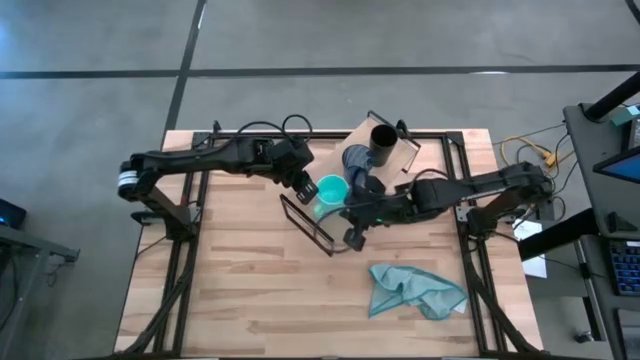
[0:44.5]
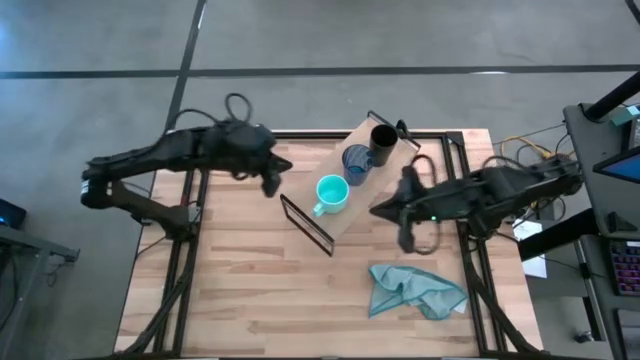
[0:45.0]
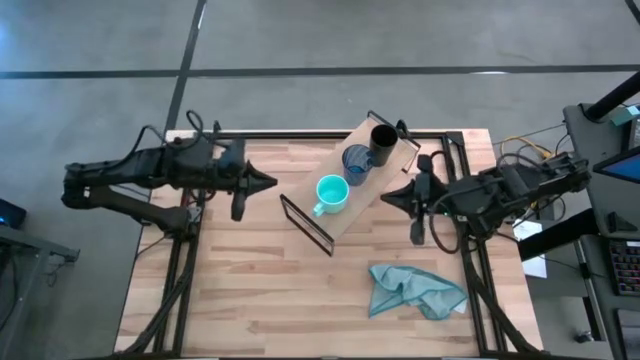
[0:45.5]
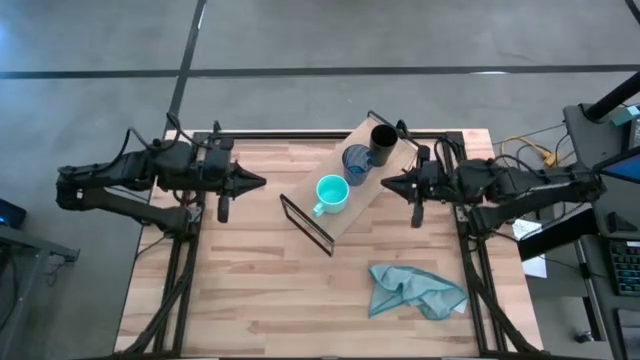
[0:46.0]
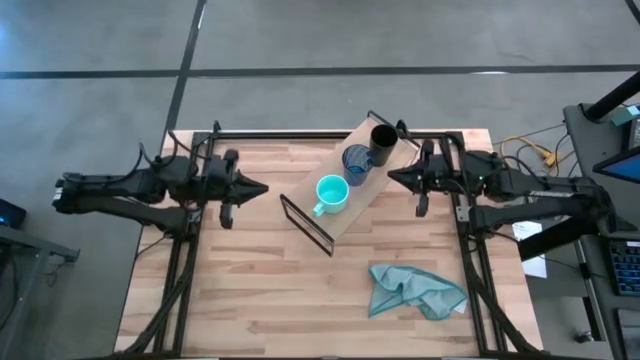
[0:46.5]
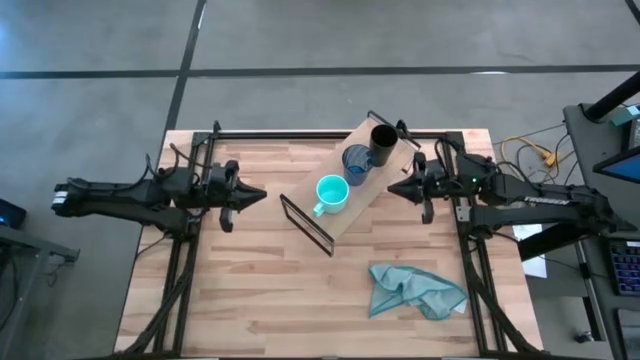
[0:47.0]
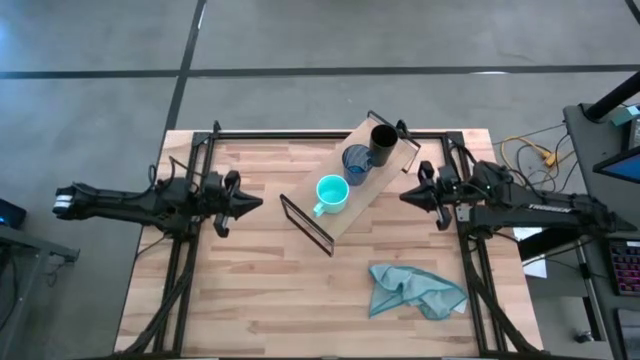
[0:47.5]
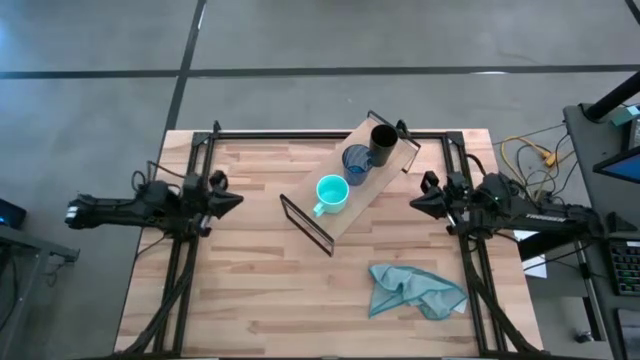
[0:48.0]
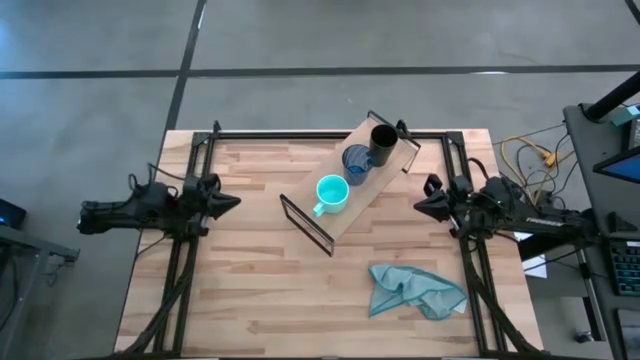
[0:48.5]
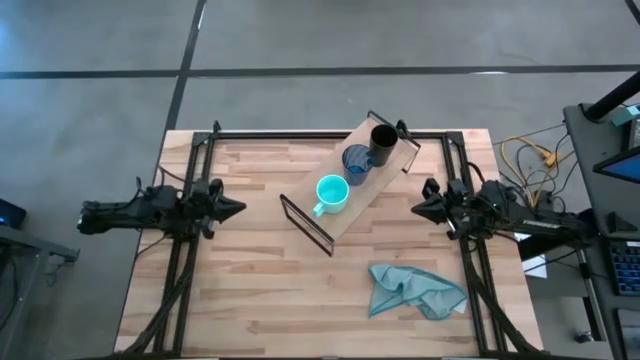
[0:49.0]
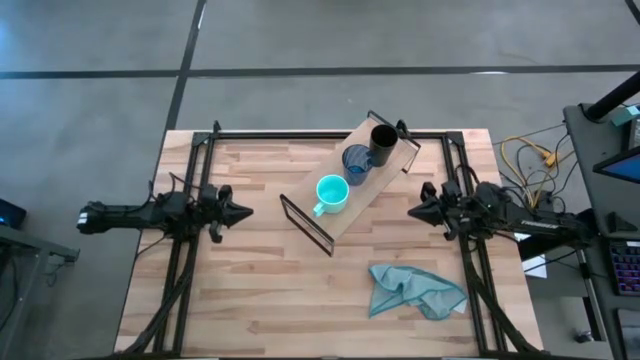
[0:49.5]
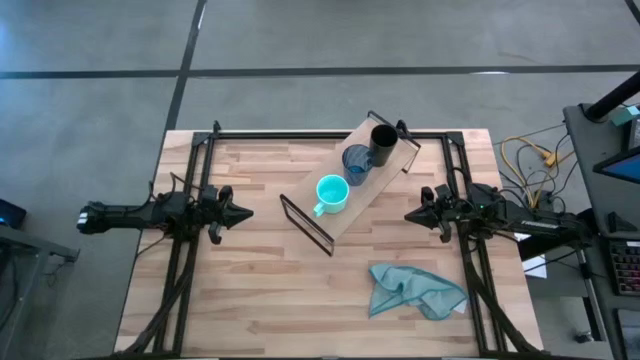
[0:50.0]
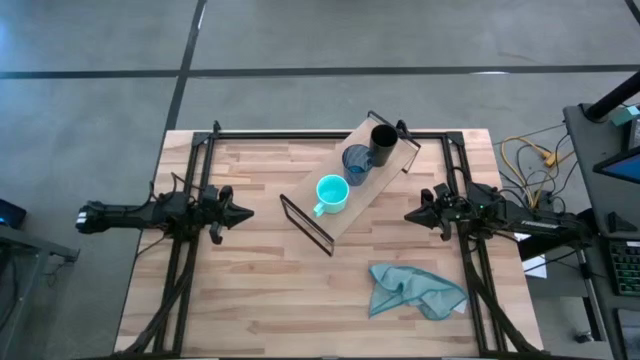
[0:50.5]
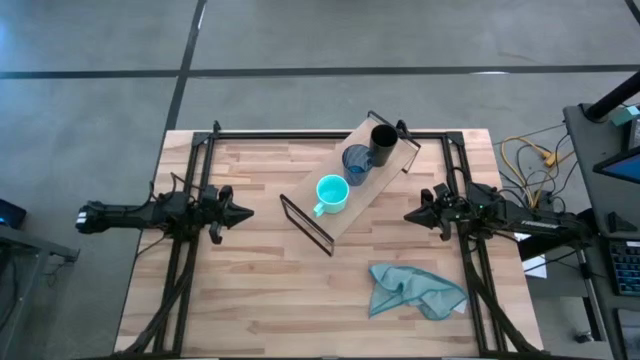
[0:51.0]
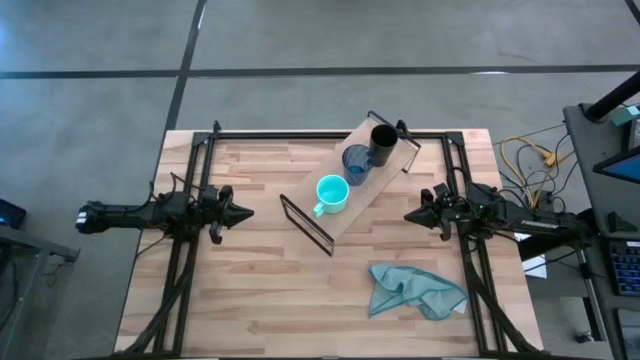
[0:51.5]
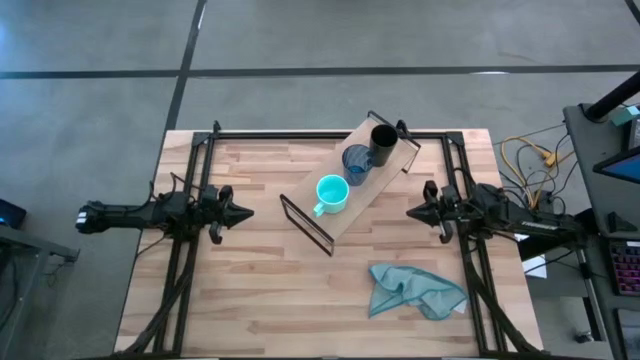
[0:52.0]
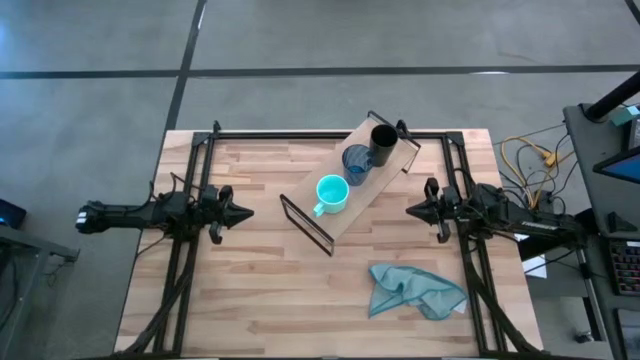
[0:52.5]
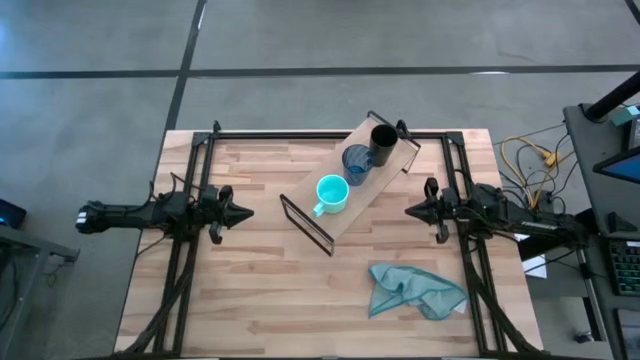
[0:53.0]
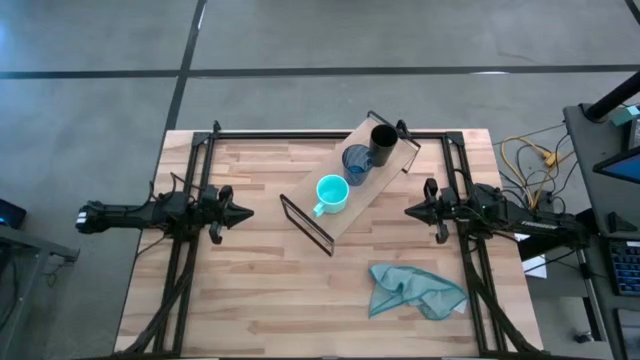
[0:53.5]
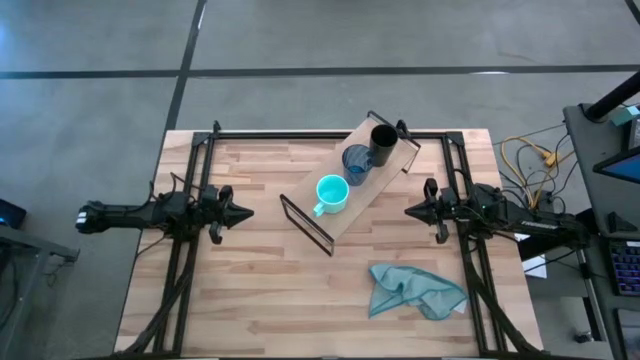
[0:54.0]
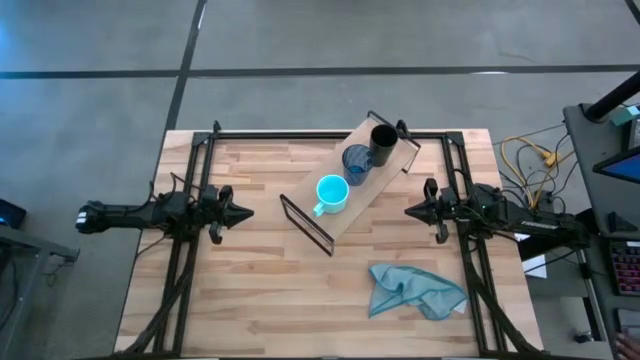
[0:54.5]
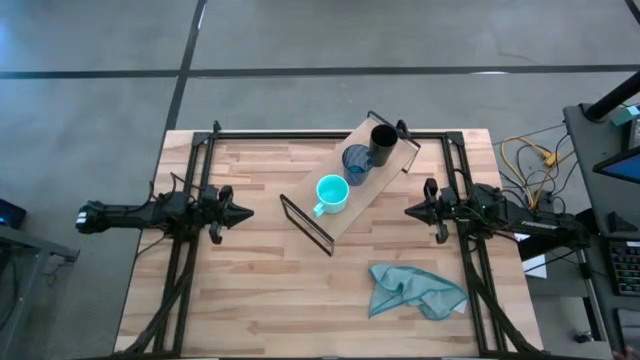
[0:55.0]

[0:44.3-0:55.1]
Task: Stack small to large cups/mugs on shelf
Return to Home Position

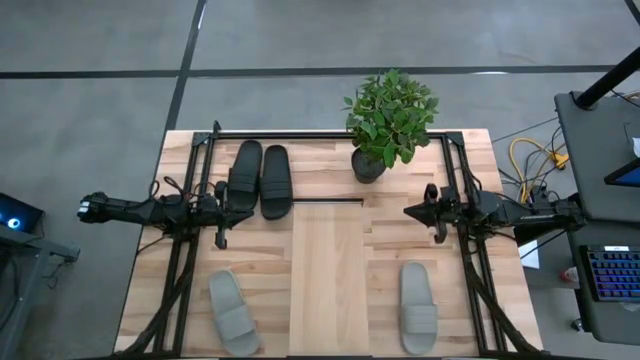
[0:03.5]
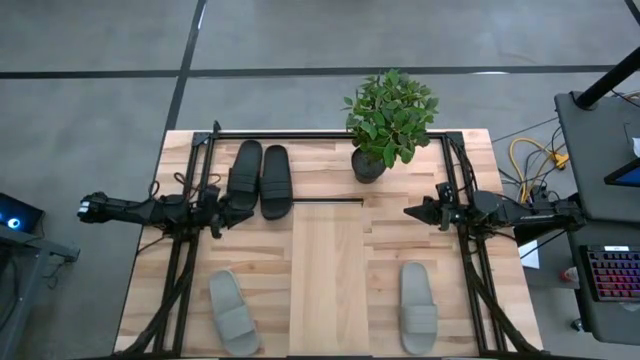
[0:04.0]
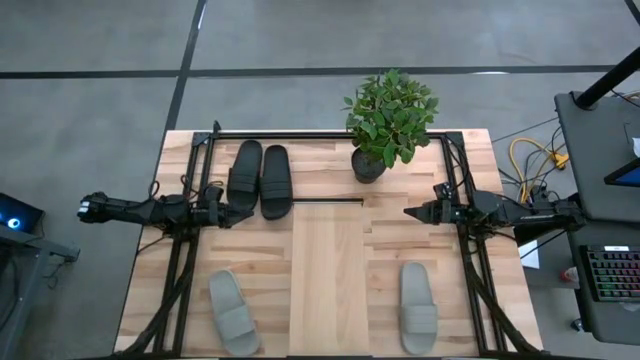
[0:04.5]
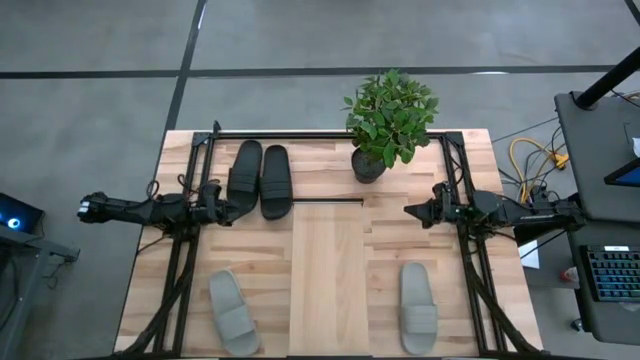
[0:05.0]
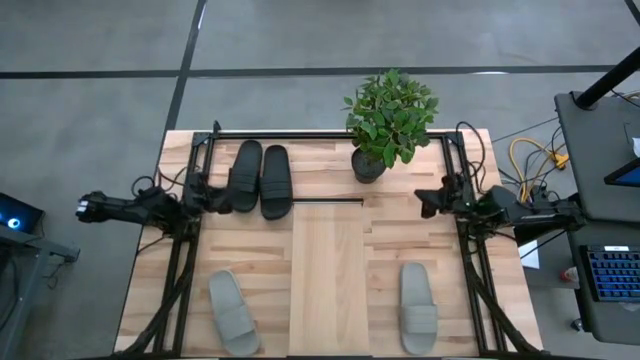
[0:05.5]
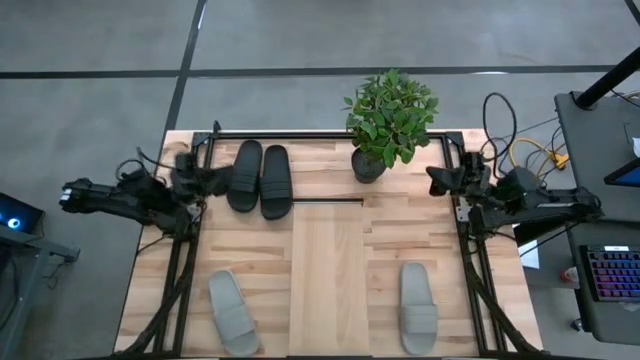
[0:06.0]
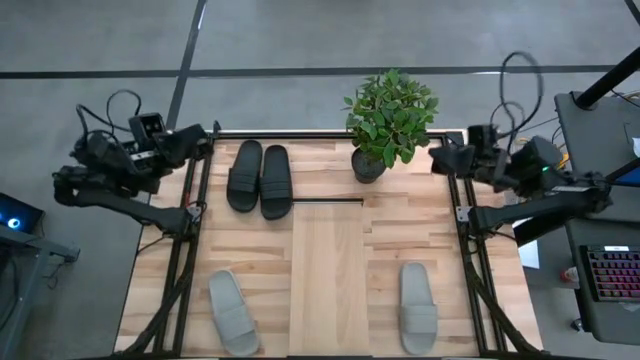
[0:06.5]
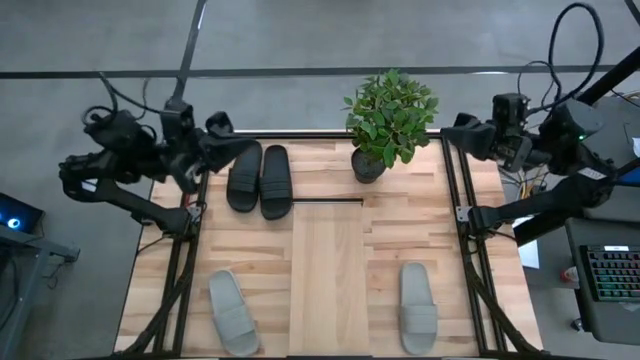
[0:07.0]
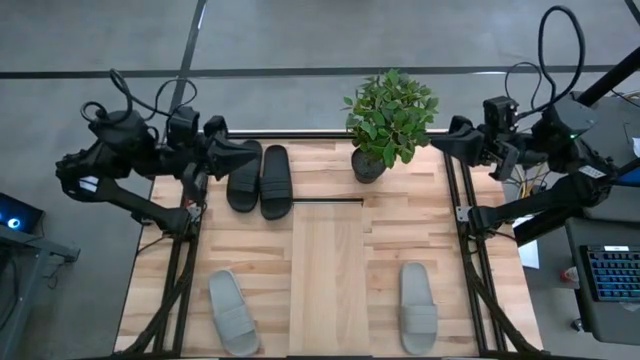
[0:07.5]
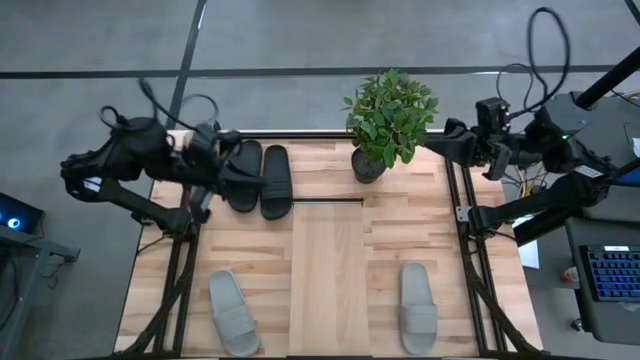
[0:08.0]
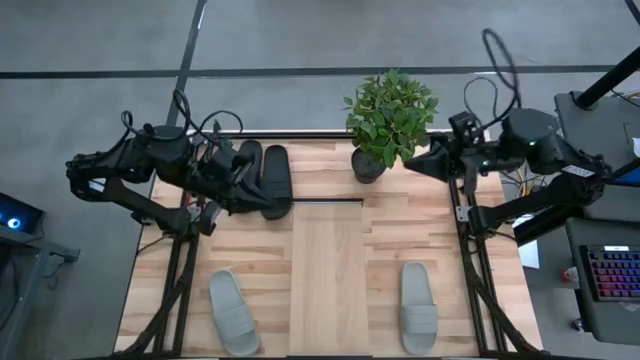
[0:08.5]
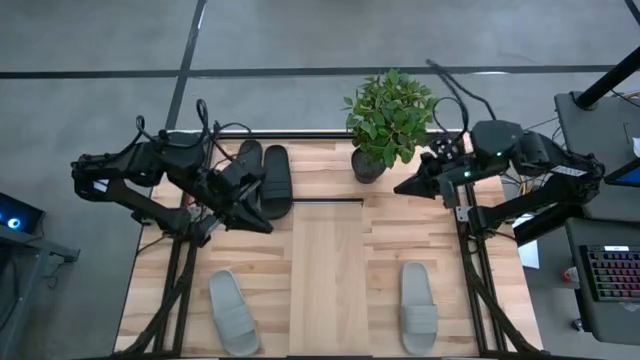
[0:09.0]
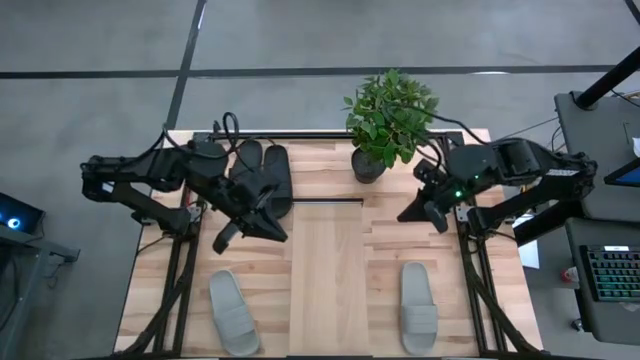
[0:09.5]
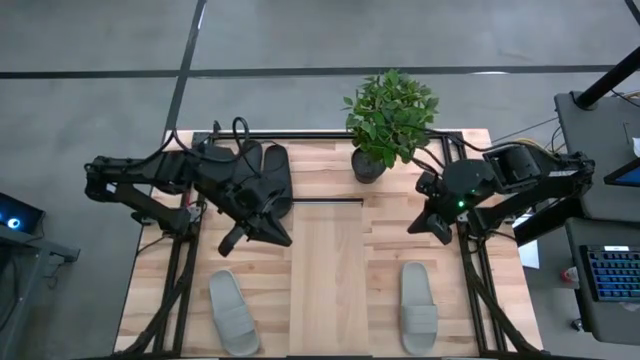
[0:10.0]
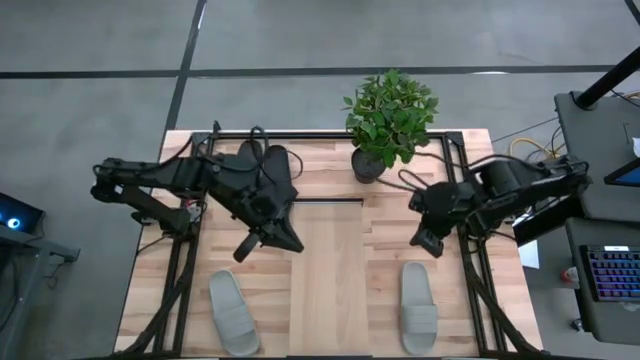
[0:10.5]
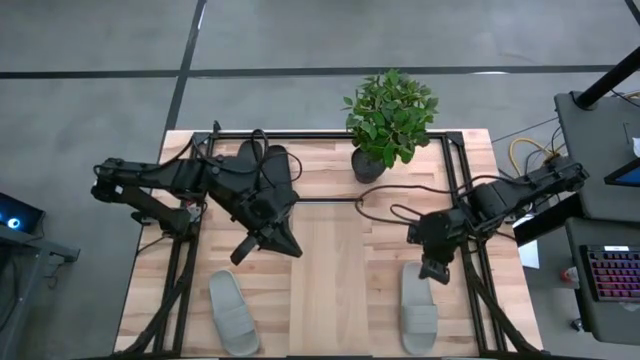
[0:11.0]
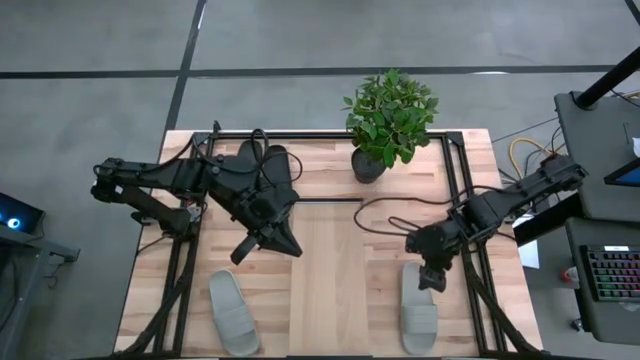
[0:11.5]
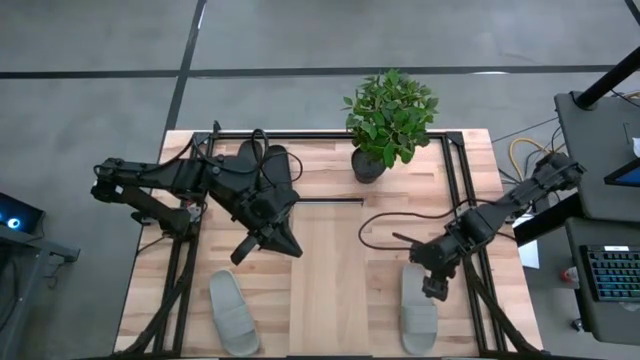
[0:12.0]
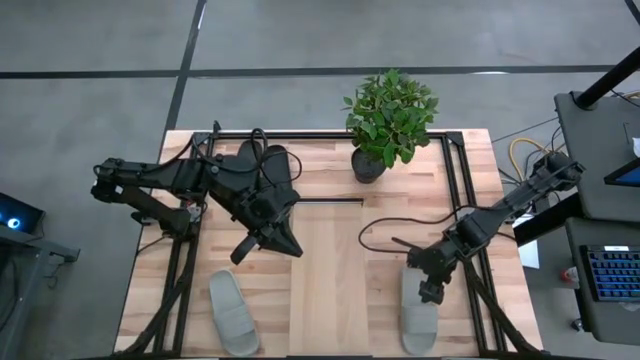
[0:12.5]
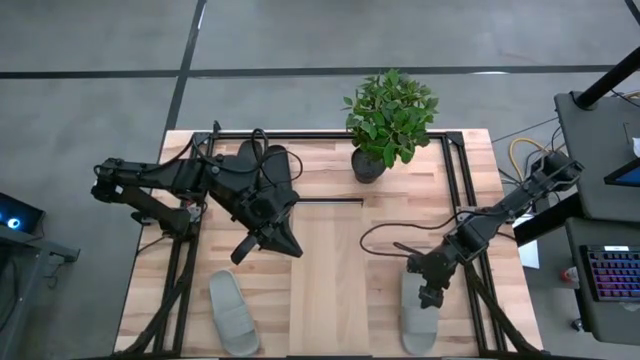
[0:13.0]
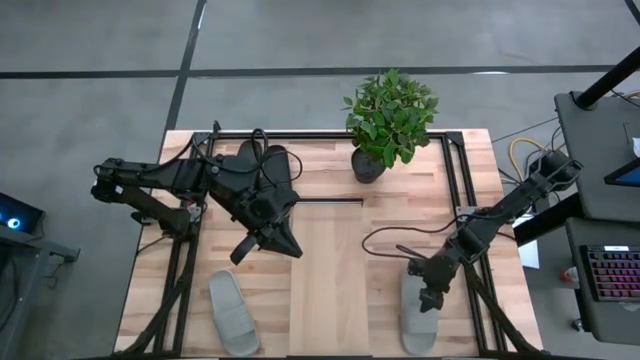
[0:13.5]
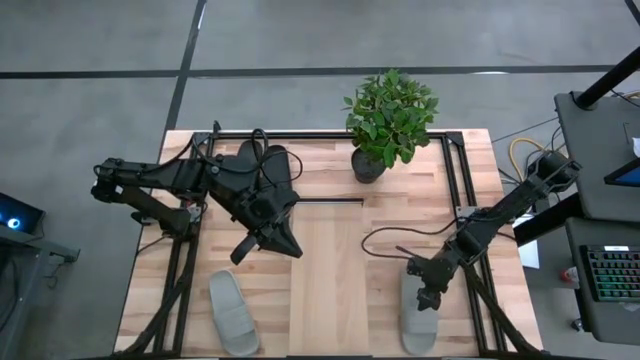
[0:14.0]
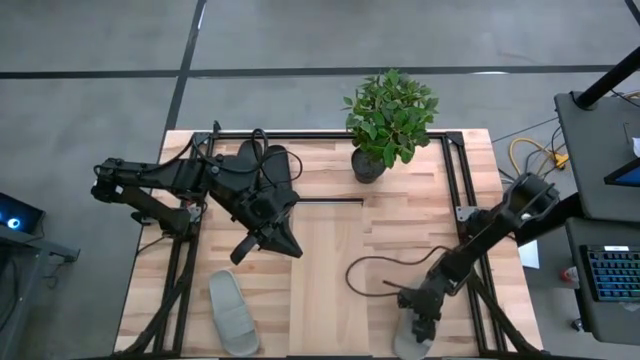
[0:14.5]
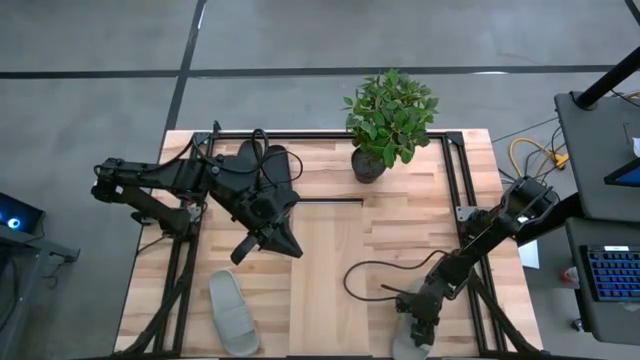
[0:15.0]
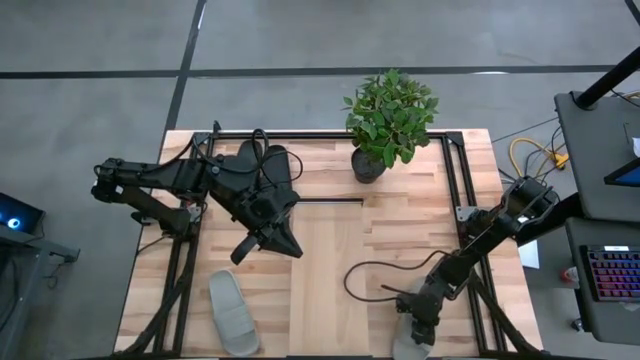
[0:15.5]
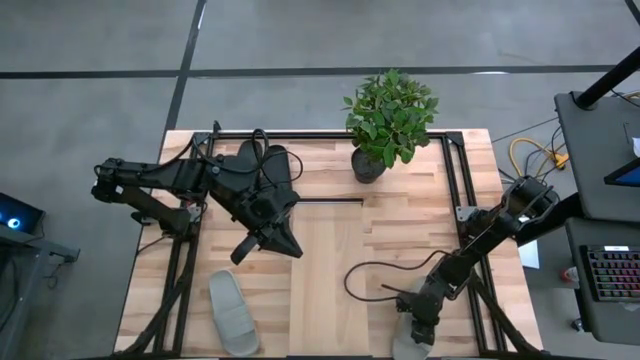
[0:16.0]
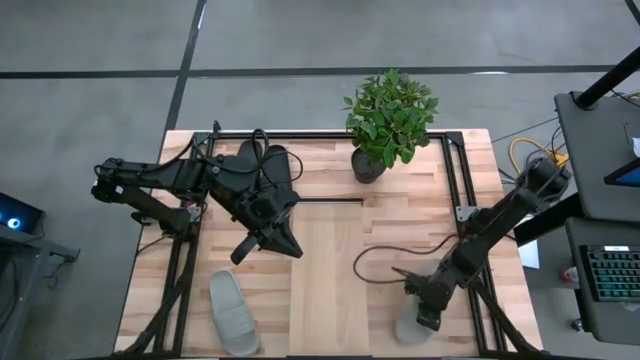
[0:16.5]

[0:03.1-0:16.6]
Task: Pick and place slides into the shelf
Put the right gray slipper on the shelf
